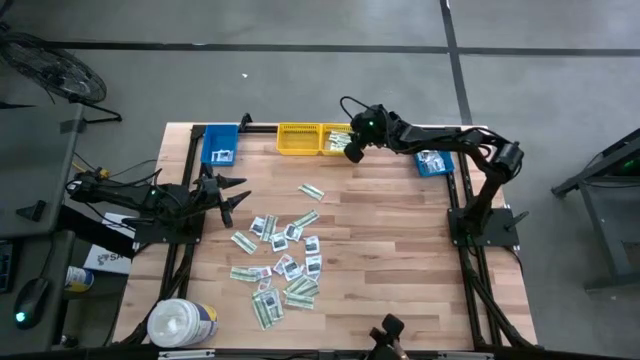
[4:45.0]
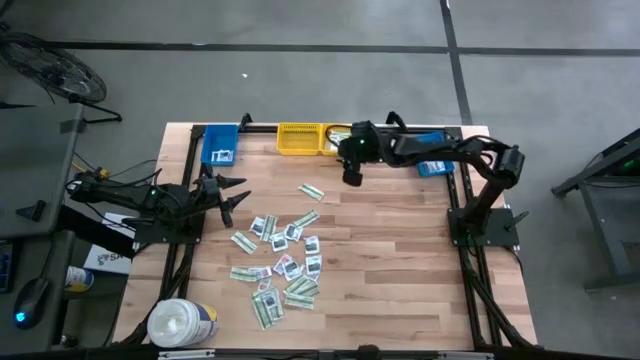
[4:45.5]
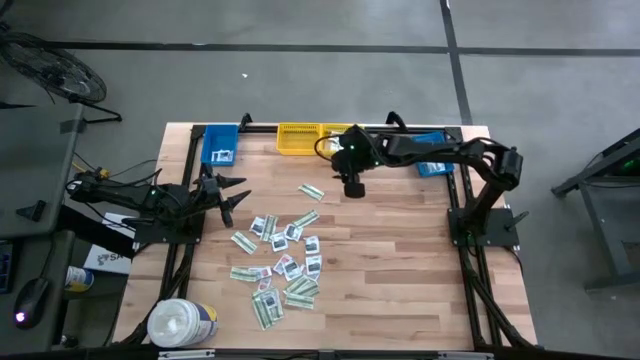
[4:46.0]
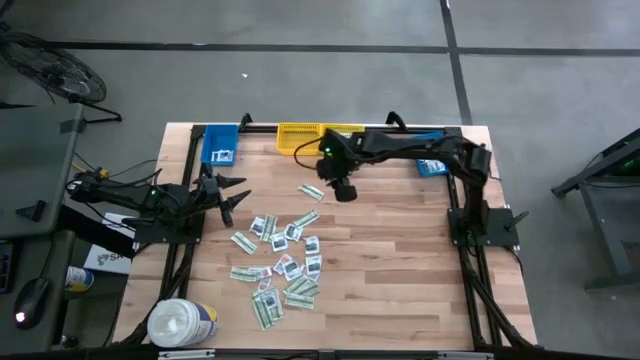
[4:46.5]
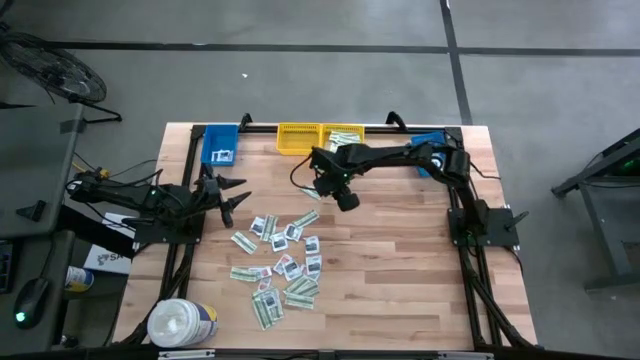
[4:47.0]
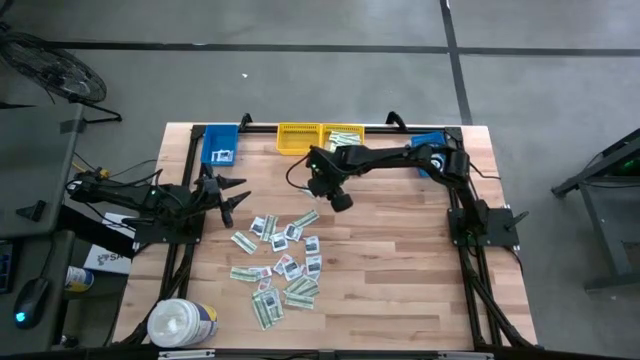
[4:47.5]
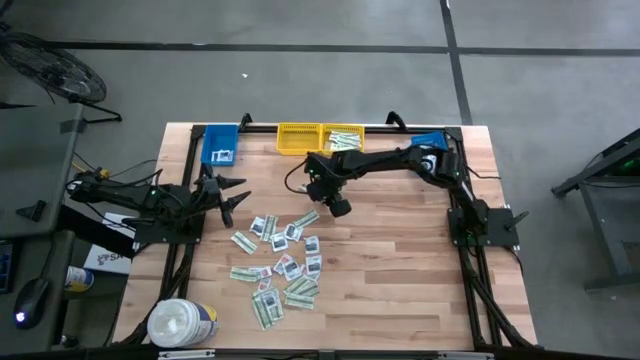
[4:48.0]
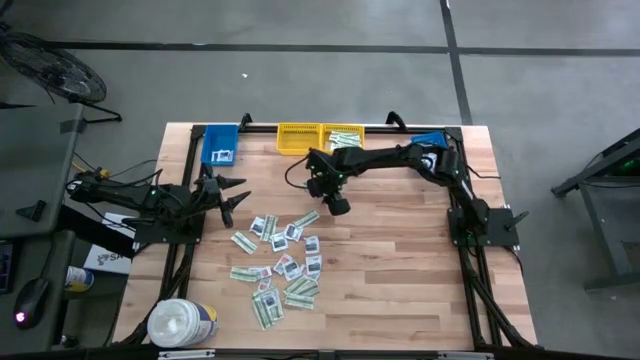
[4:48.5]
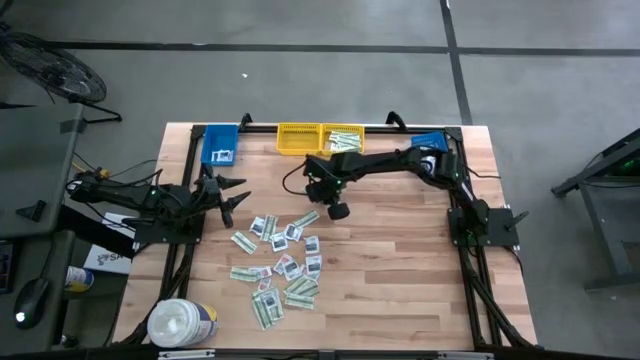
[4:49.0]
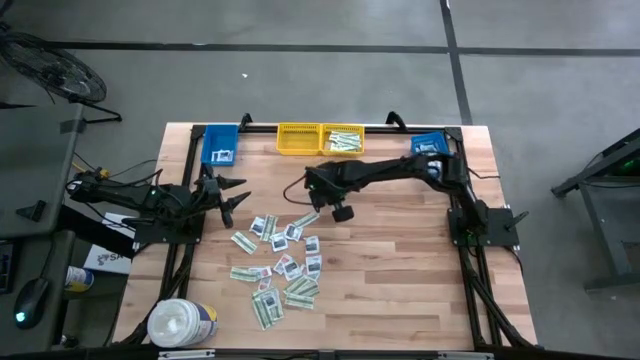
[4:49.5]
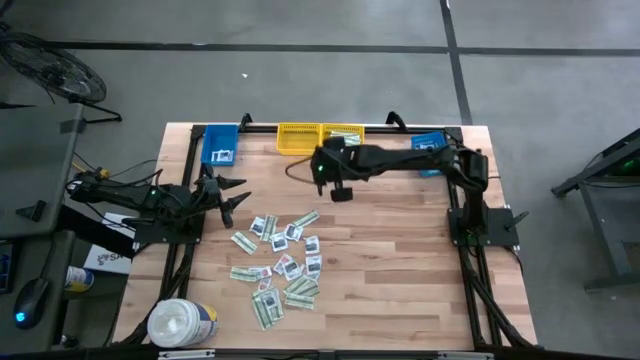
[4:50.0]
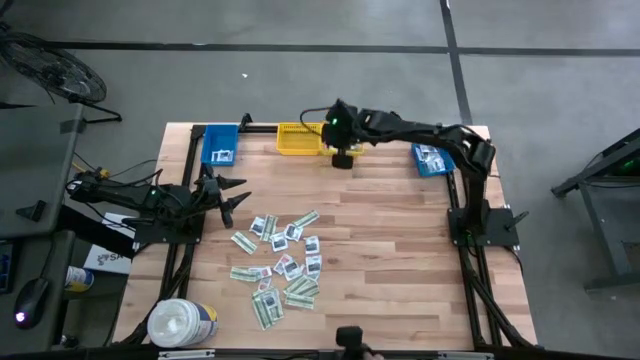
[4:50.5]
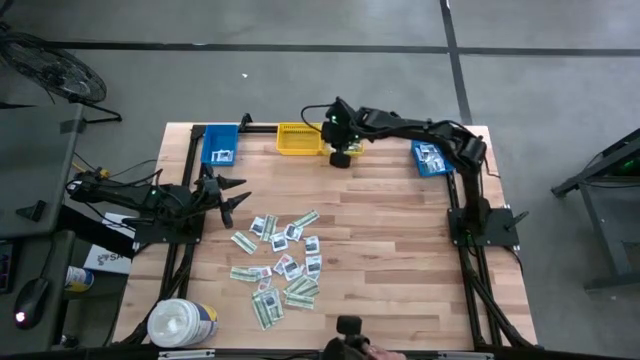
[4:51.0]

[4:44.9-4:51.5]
Task: Pick & Place First Aid Supplies
Put the green bandage pack into the right yellow bin

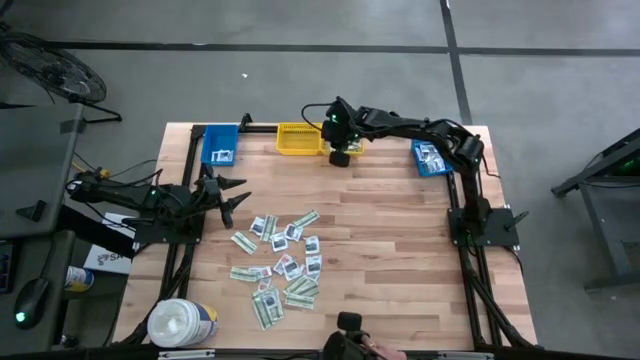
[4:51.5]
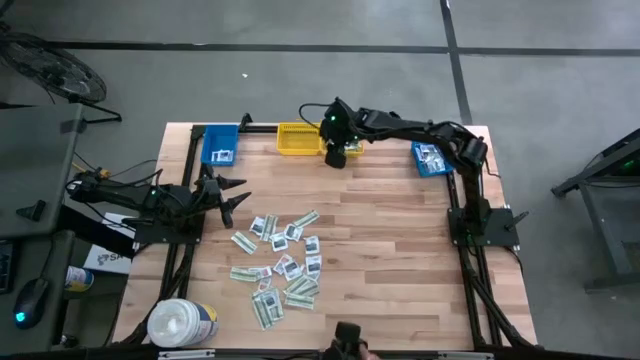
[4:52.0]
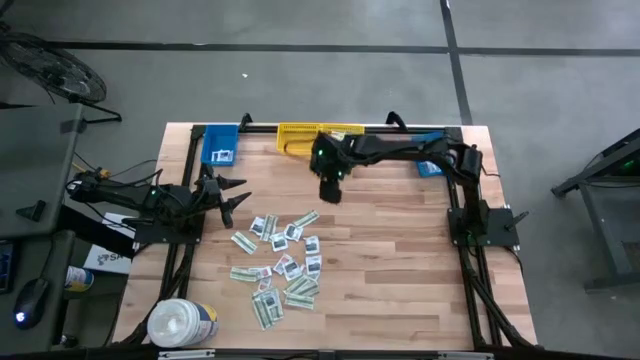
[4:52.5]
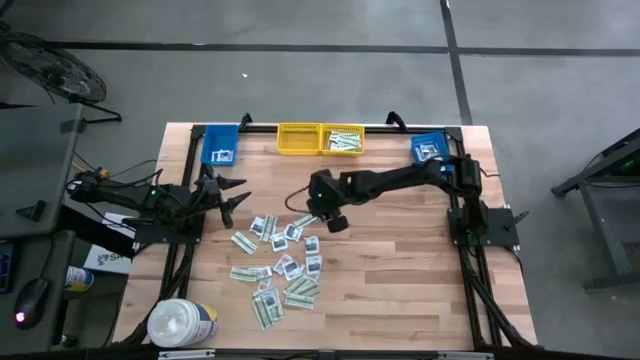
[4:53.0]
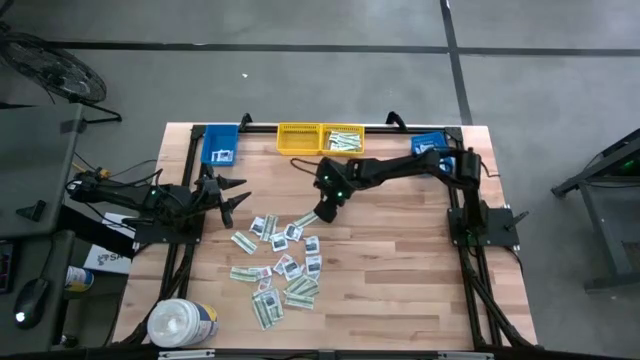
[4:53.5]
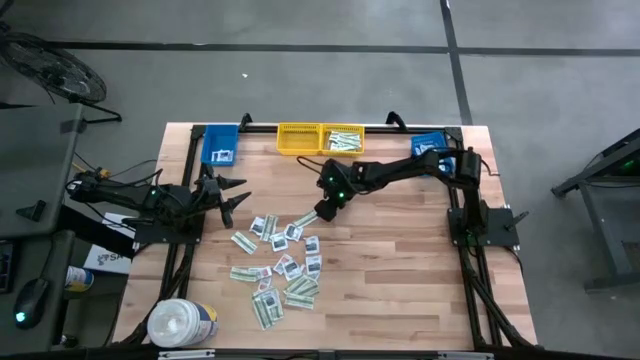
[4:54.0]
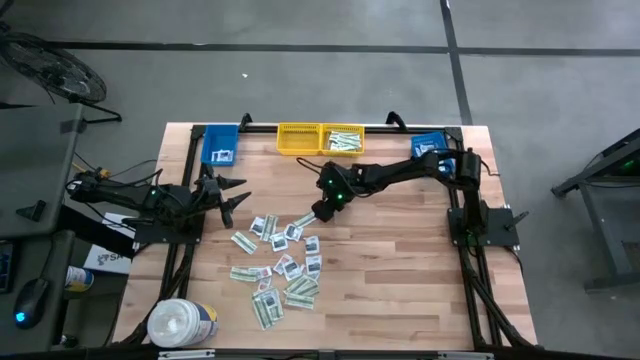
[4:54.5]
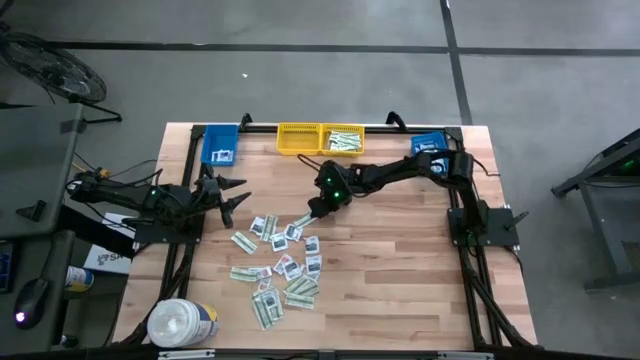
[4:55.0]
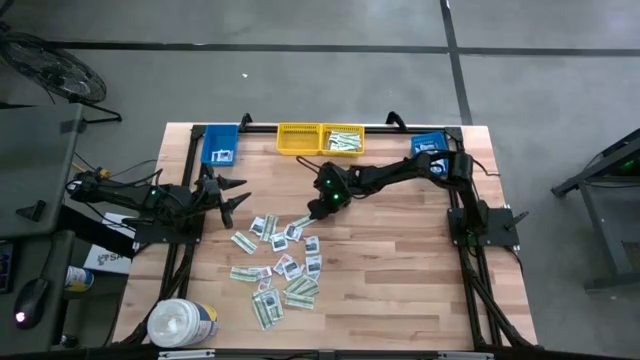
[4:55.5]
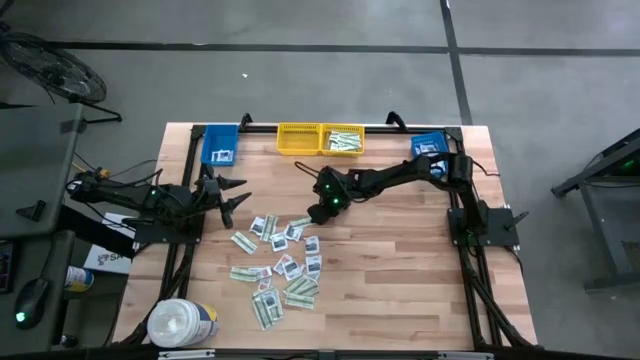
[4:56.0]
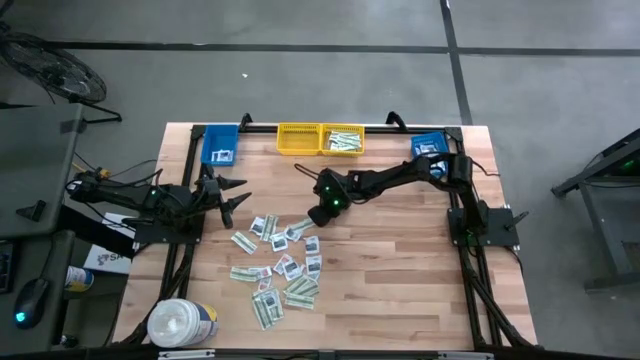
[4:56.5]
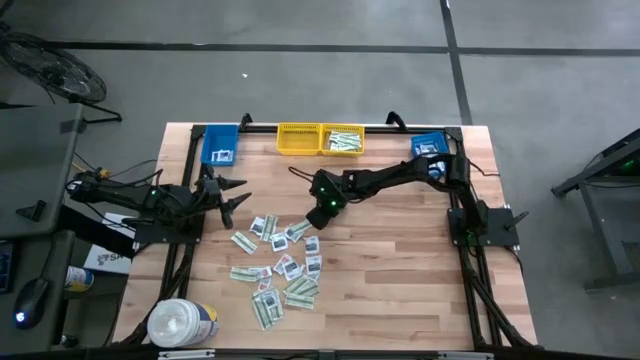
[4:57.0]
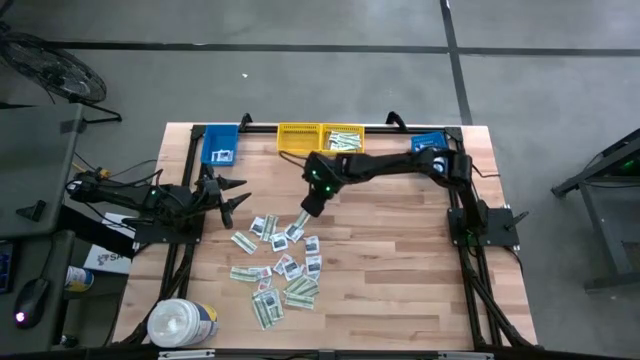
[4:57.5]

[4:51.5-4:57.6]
Put the green bandage pack into the right yellow bin

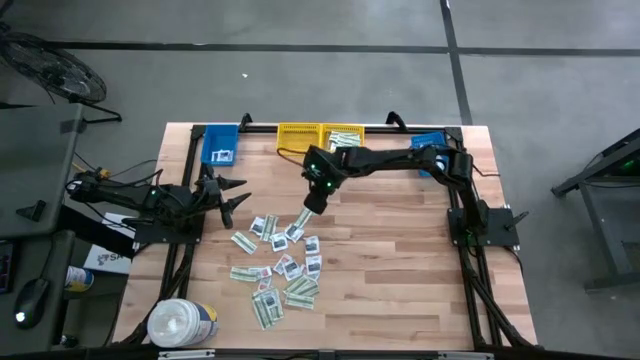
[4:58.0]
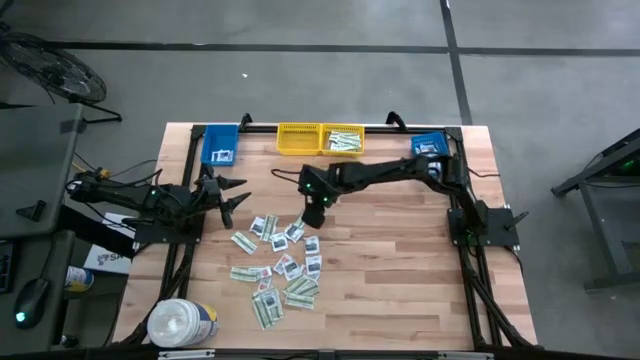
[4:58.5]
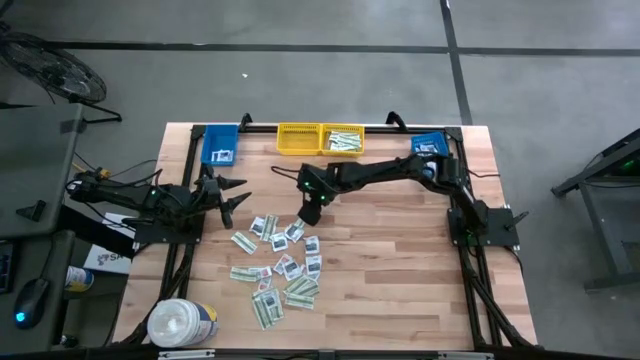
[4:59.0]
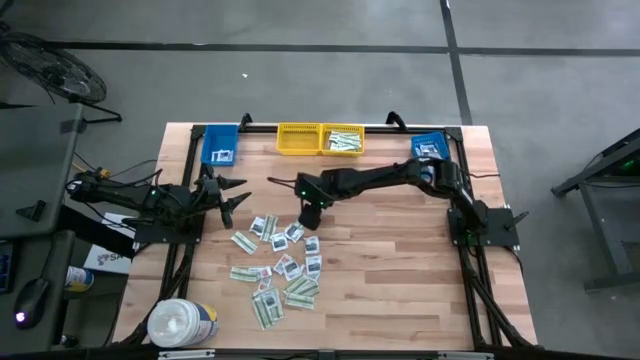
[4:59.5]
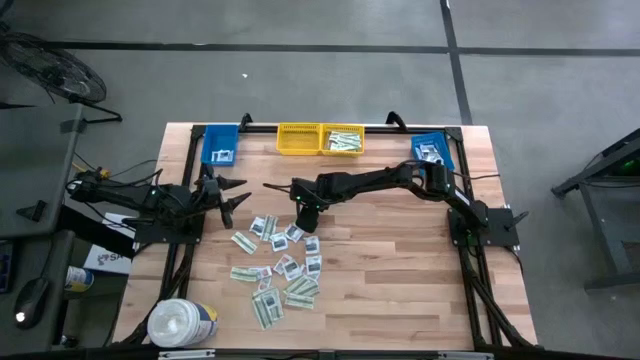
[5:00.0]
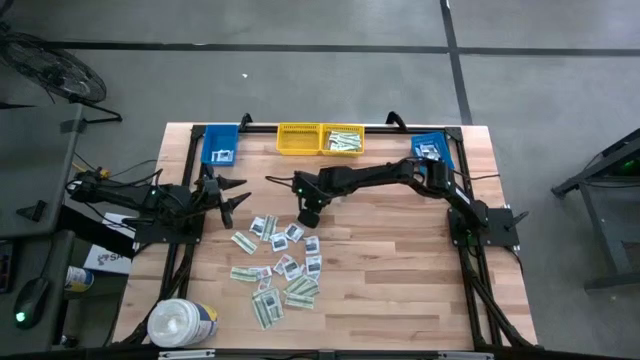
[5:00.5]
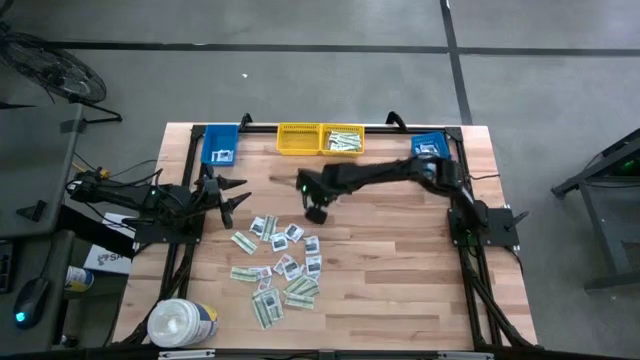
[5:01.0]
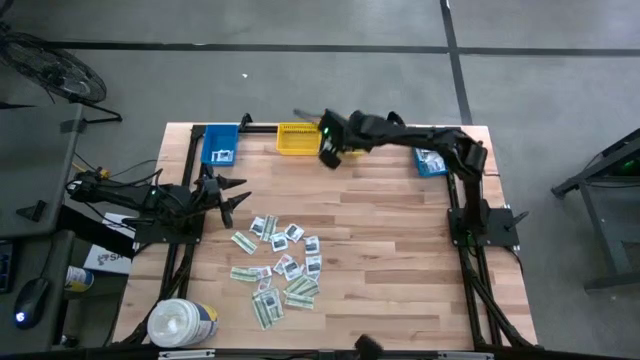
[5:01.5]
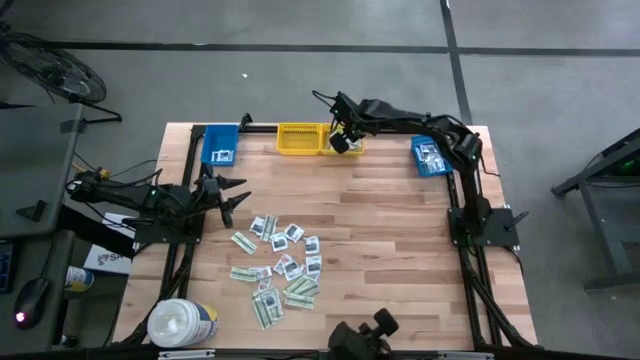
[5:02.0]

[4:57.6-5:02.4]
Put the green bandage pack into the right yellow bin

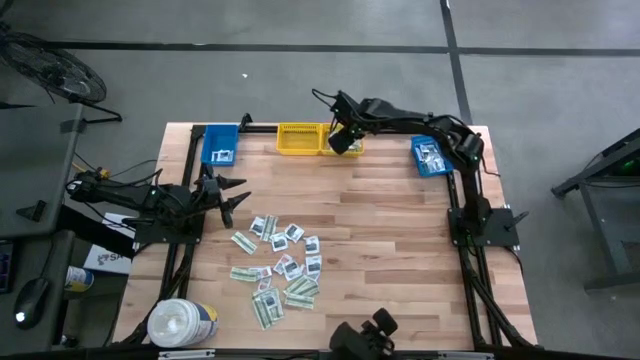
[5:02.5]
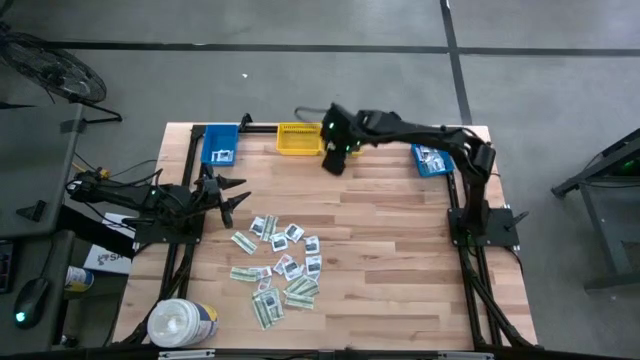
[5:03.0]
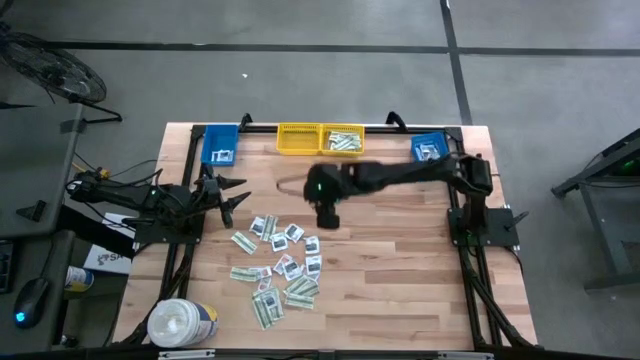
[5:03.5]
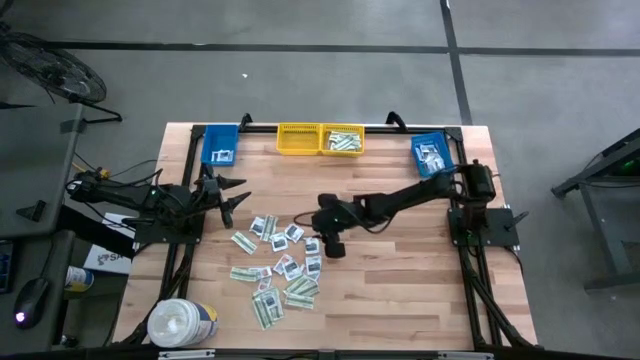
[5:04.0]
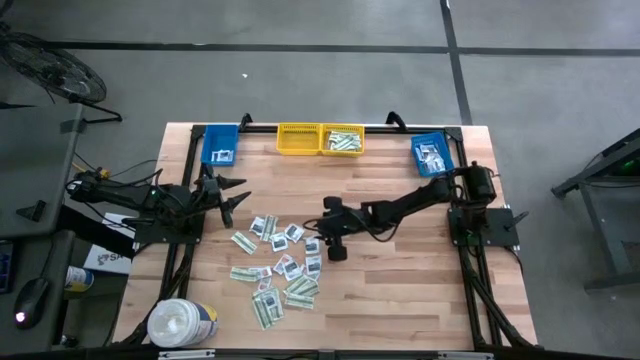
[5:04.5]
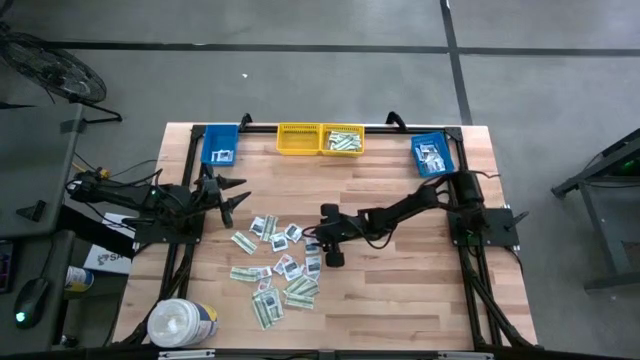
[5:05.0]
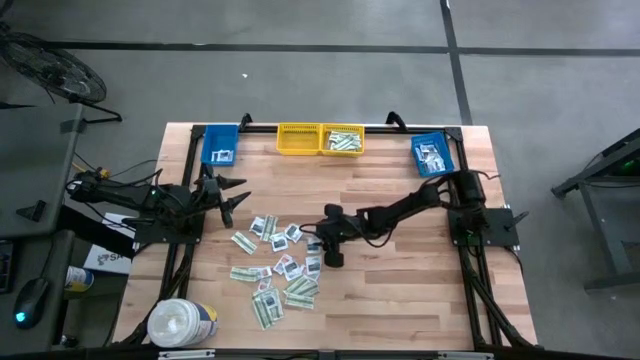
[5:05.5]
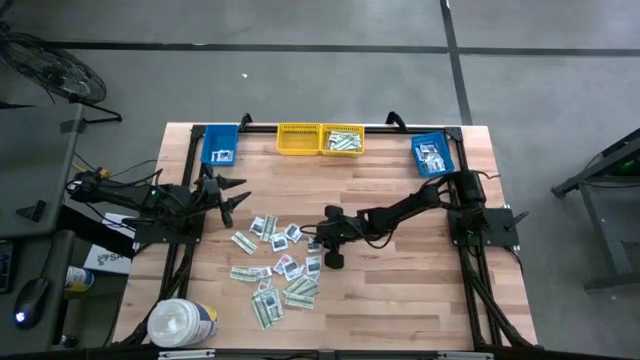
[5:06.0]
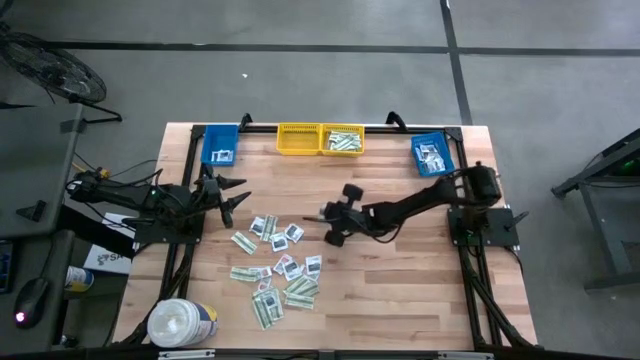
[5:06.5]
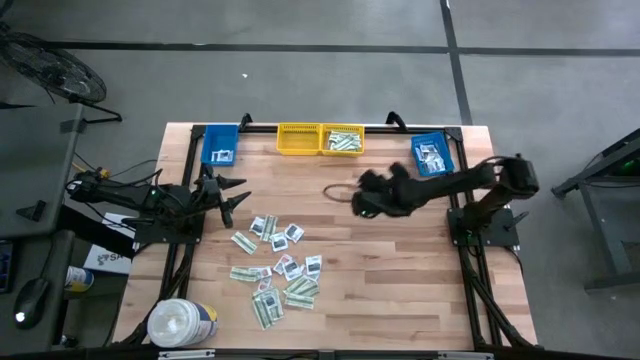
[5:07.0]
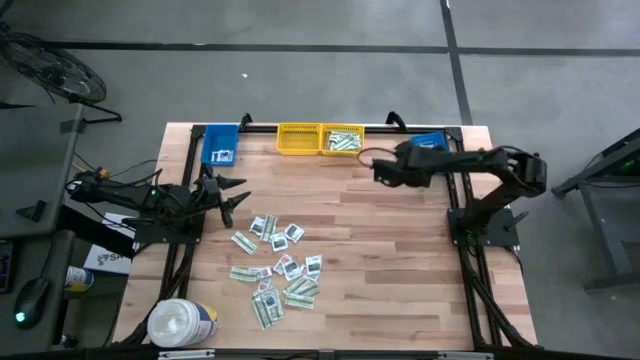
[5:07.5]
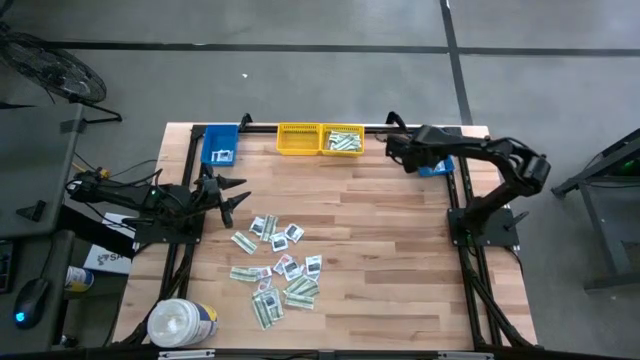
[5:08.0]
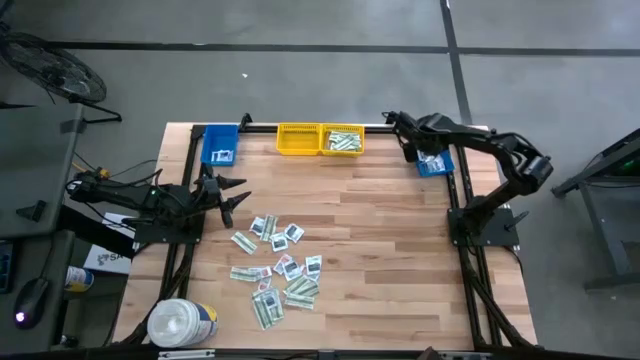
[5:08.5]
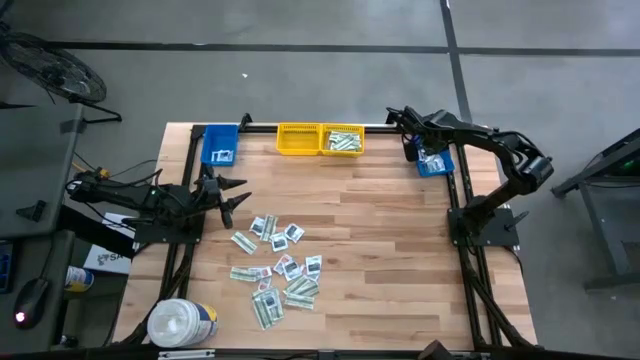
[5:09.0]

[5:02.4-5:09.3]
Put the black towelette pack into the right blue bin
